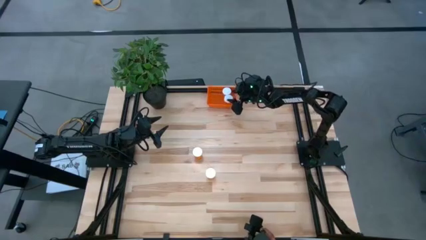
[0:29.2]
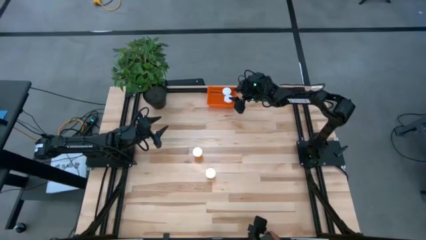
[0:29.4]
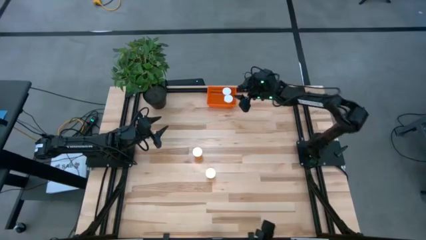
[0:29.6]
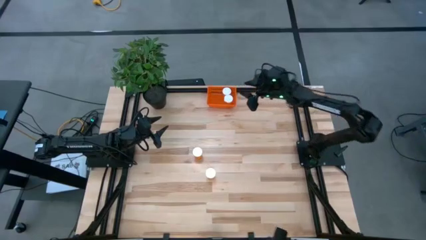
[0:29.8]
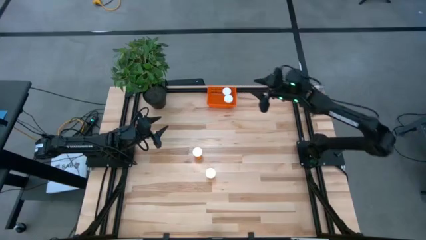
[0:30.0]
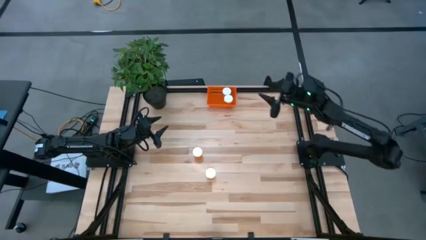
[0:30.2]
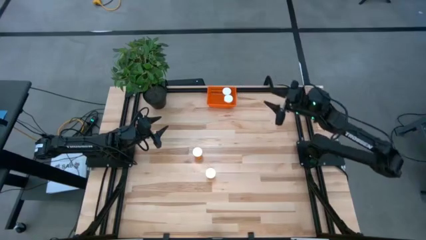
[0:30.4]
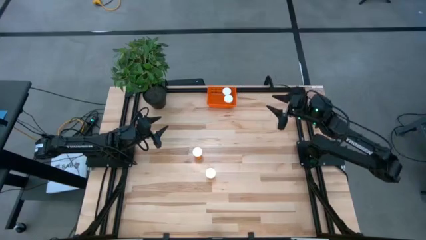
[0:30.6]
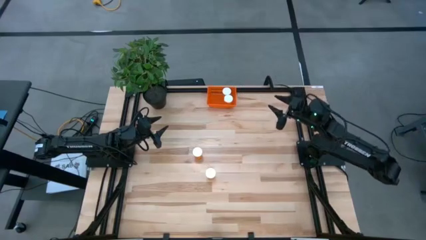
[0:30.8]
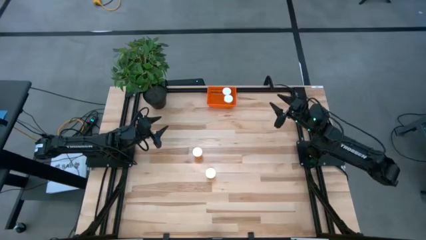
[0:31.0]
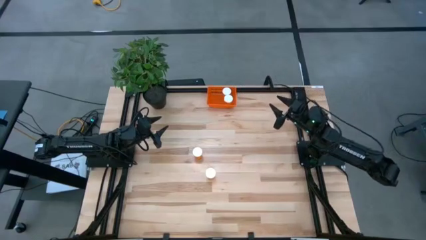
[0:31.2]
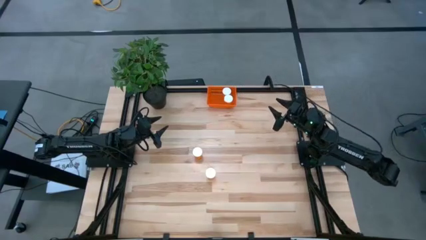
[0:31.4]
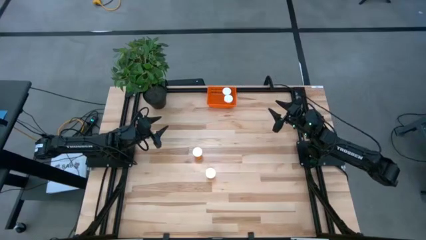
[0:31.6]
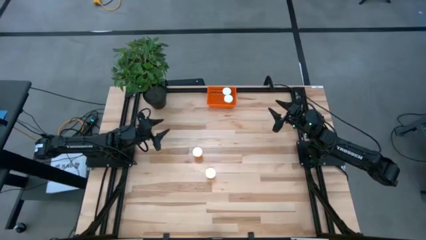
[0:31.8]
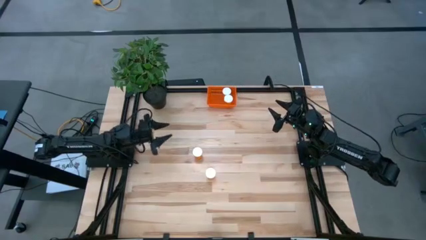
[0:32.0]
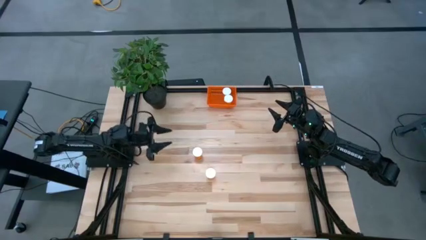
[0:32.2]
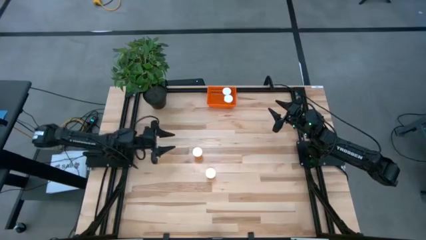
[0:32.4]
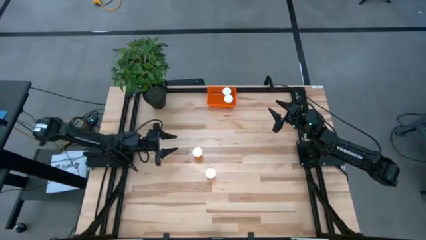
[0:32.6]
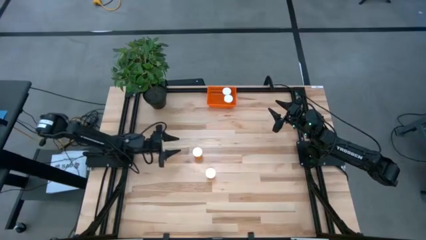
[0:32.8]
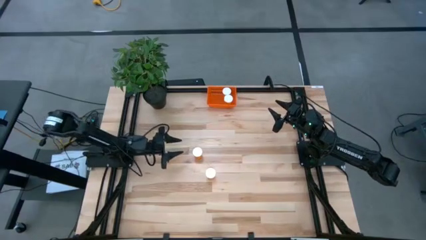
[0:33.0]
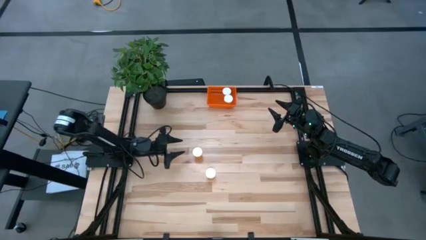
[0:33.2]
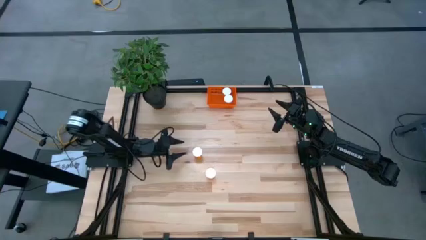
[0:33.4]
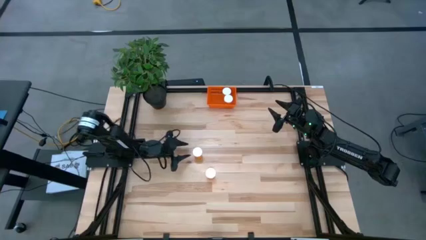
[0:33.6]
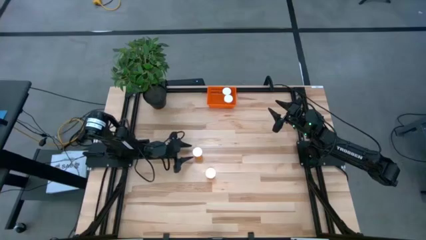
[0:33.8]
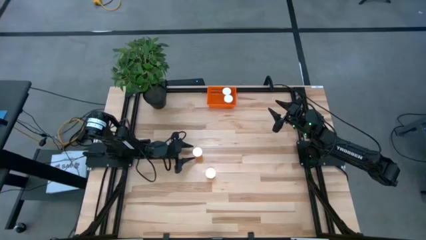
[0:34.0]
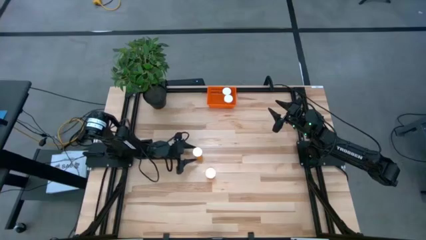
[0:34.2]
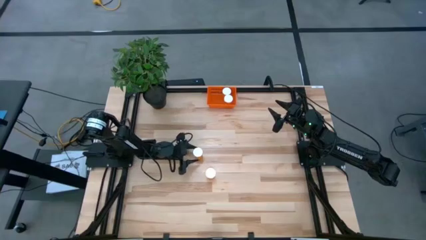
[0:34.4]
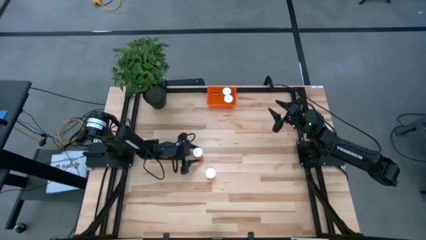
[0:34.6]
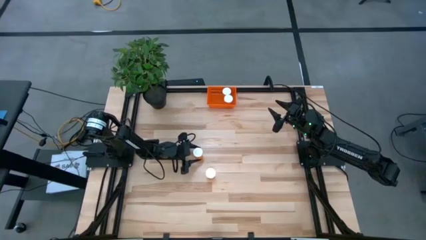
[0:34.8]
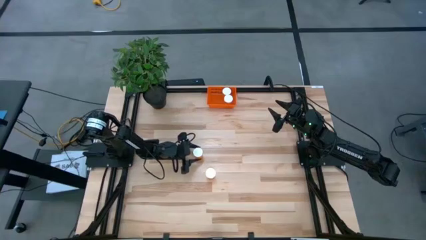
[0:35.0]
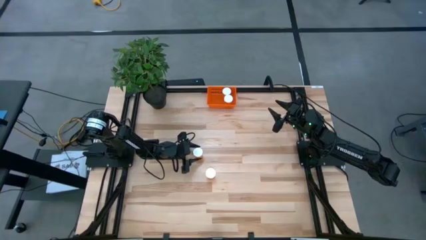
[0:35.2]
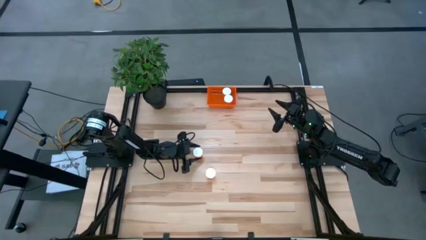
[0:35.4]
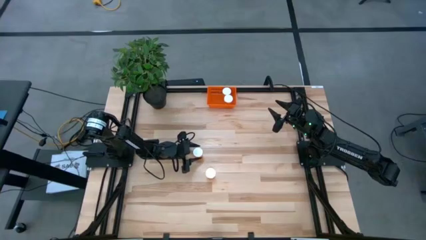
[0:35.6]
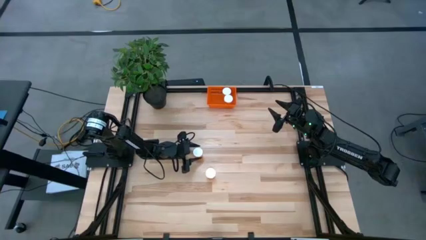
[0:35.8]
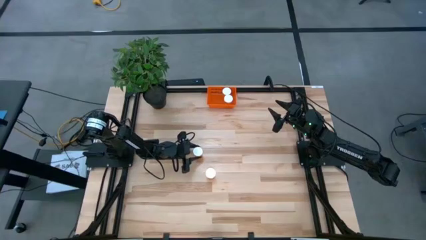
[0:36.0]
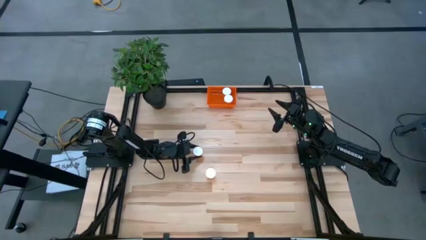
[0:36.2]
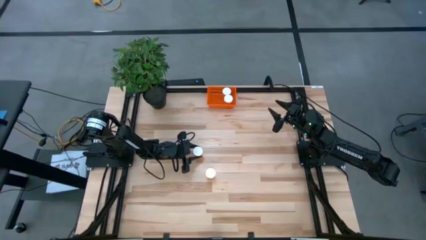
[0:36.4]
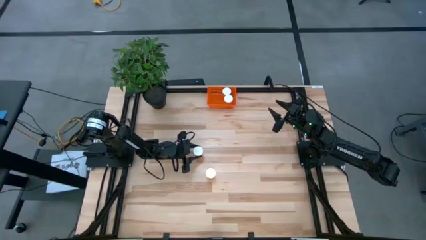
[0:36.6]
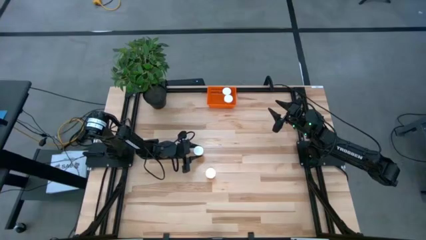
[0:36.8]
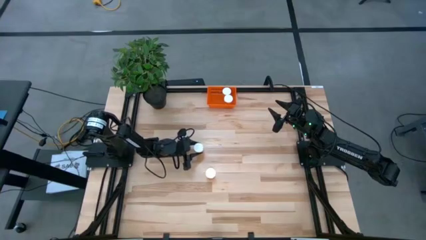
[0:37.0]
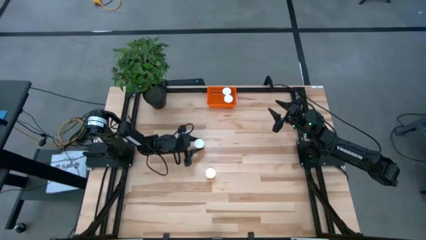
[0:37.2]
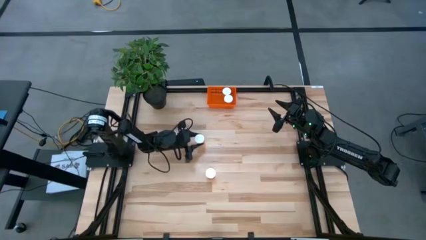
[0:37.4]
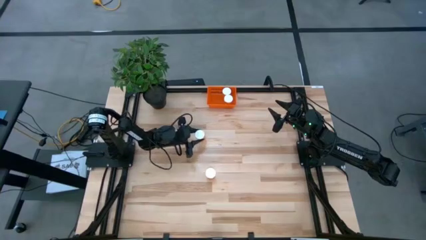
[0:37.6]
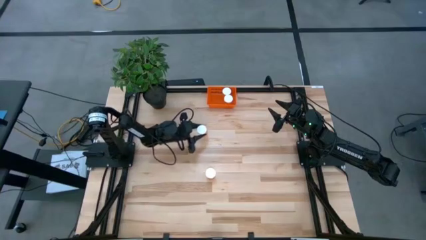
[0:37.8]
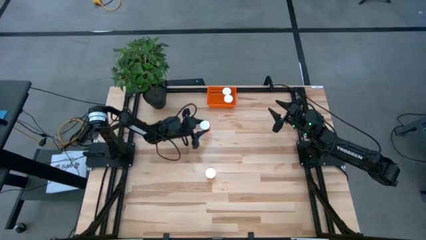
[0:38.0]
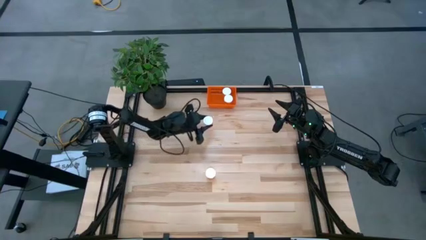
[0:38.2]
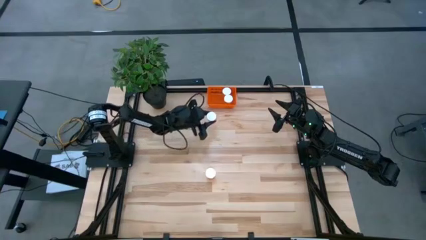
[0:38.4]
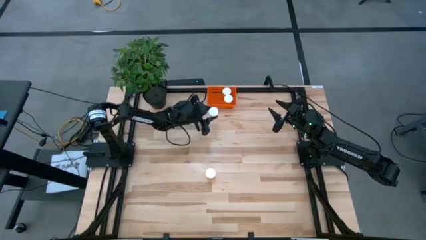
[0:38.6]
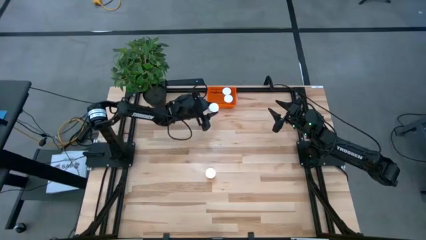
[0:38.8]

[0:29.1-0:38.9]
Task: Pick and place pill bottles into a basket
Put the top orange pill bottle into the orange bin

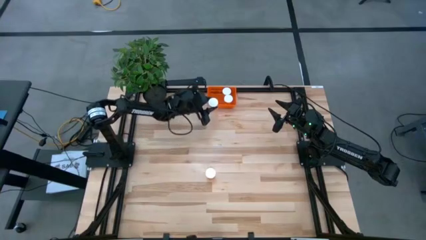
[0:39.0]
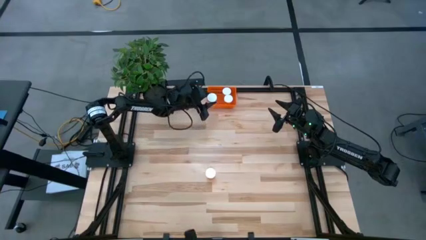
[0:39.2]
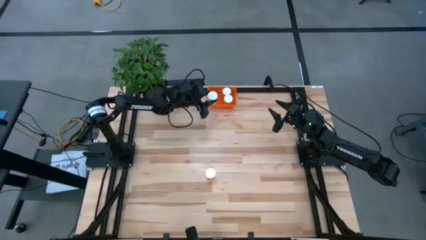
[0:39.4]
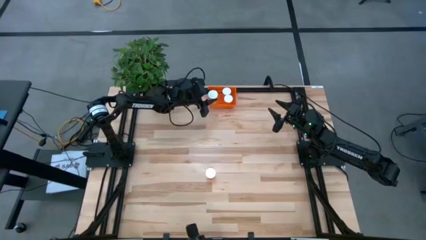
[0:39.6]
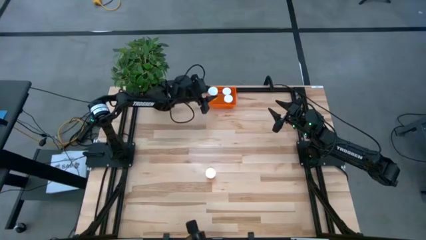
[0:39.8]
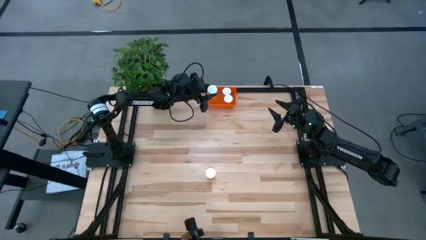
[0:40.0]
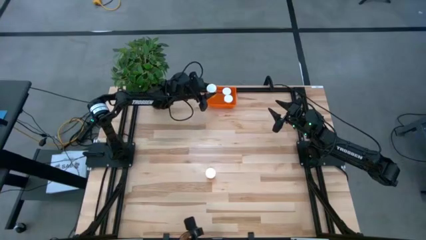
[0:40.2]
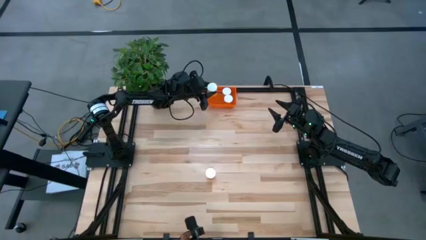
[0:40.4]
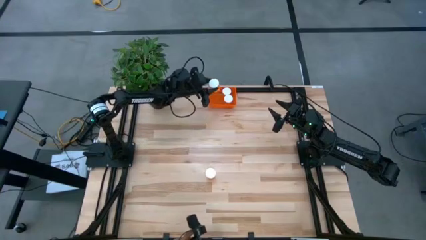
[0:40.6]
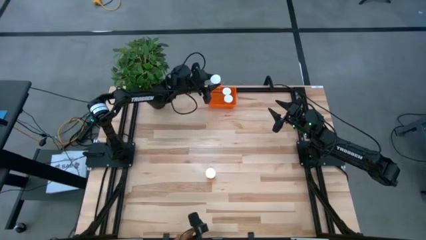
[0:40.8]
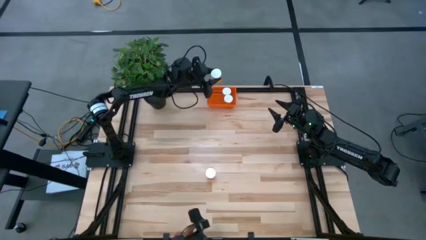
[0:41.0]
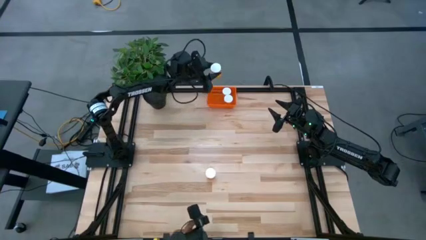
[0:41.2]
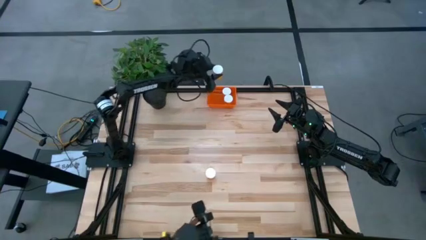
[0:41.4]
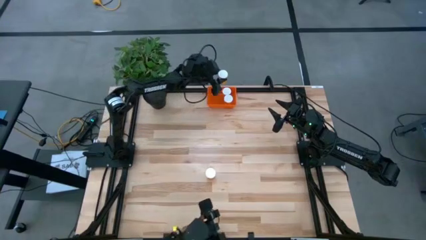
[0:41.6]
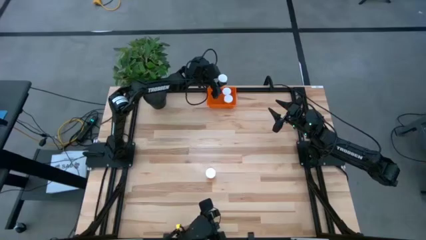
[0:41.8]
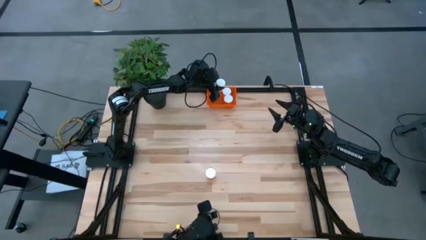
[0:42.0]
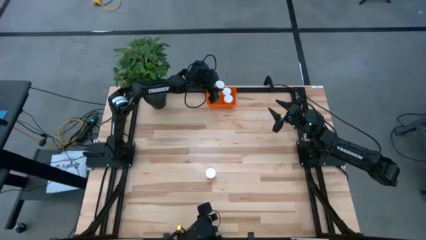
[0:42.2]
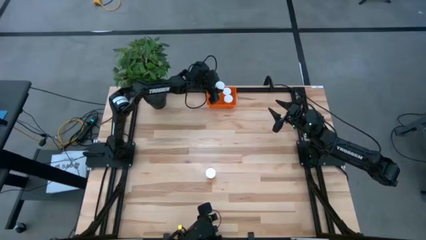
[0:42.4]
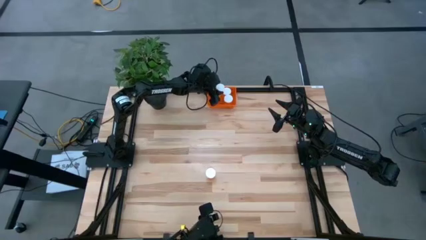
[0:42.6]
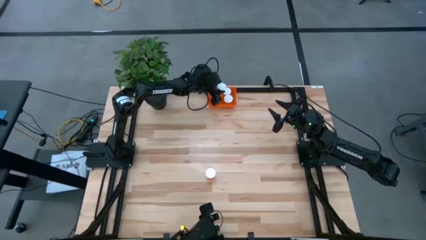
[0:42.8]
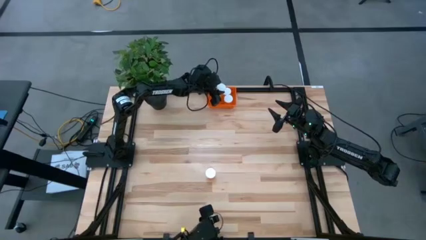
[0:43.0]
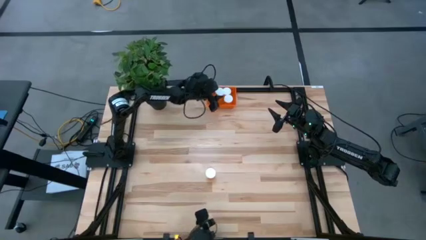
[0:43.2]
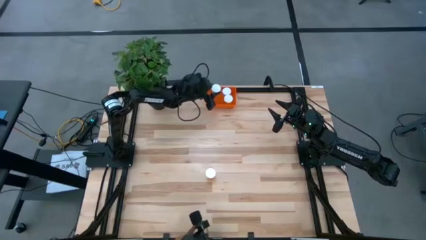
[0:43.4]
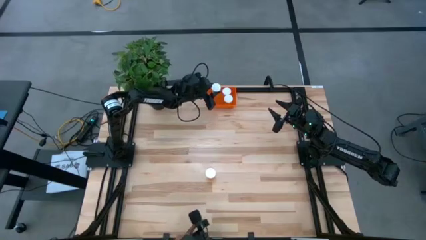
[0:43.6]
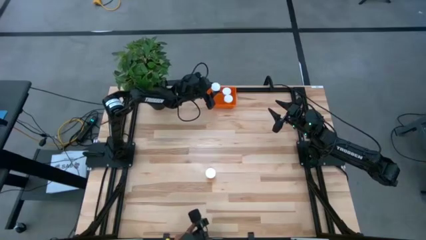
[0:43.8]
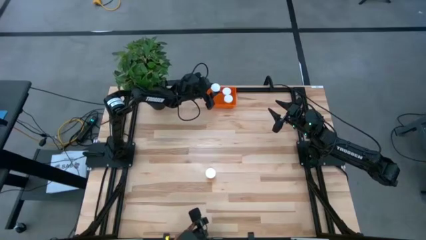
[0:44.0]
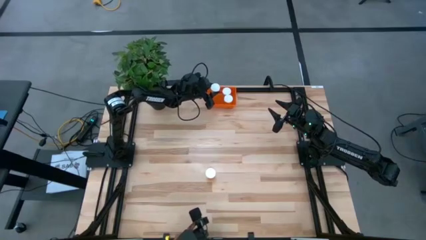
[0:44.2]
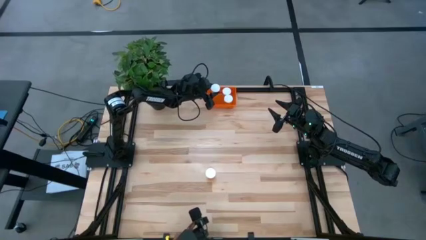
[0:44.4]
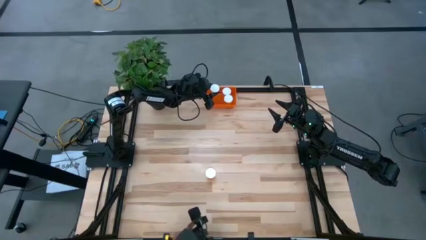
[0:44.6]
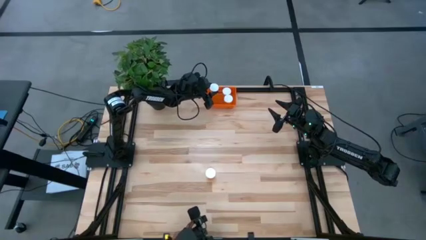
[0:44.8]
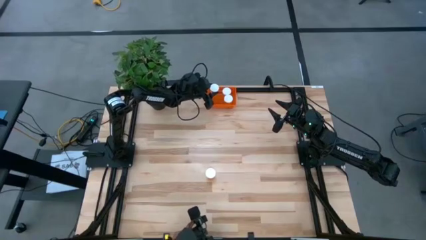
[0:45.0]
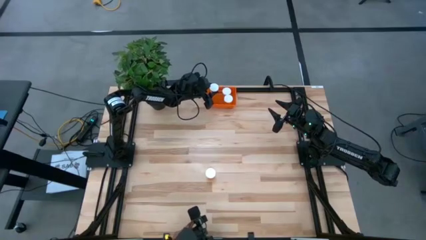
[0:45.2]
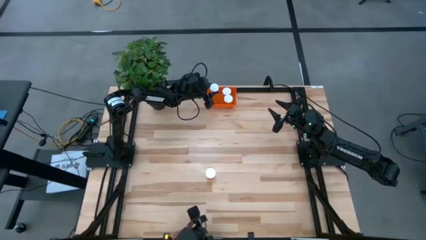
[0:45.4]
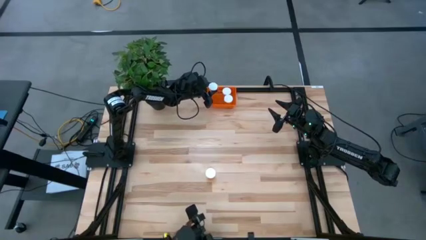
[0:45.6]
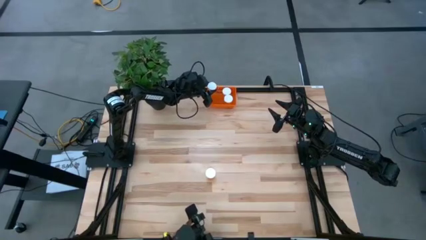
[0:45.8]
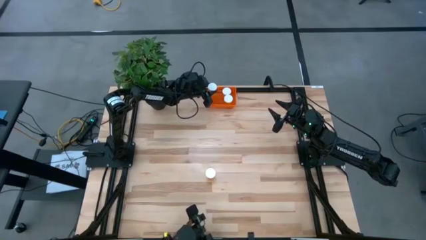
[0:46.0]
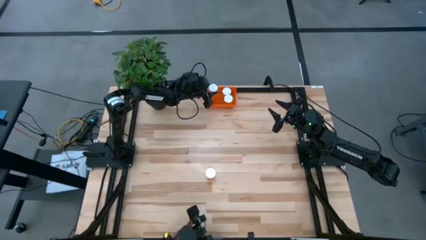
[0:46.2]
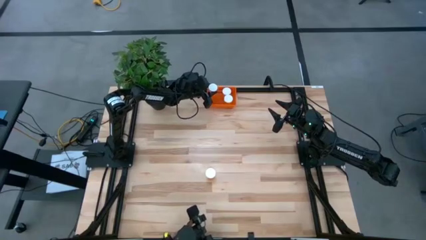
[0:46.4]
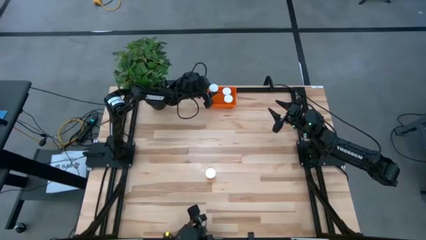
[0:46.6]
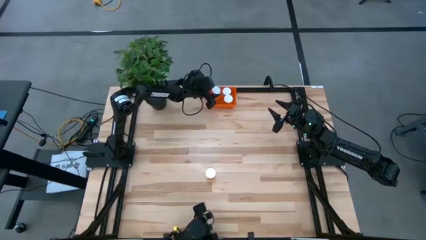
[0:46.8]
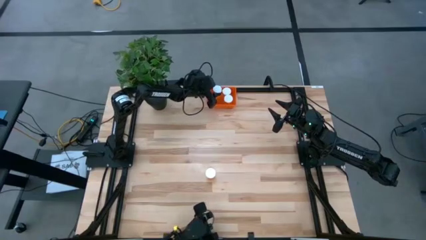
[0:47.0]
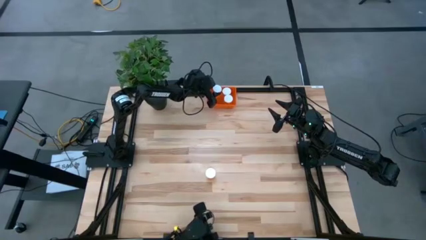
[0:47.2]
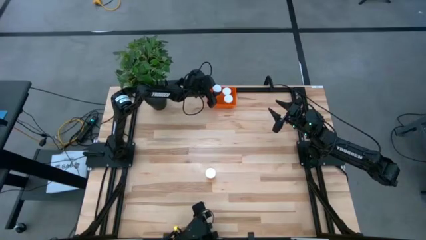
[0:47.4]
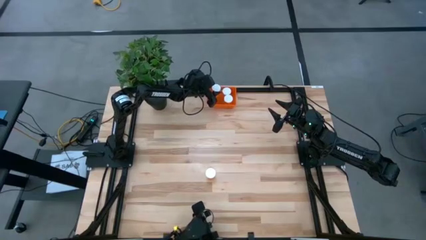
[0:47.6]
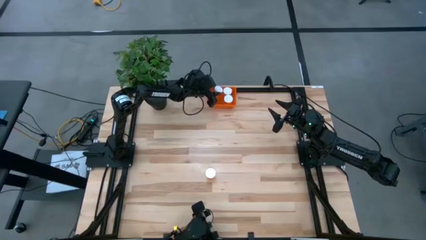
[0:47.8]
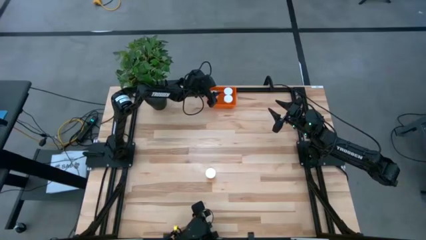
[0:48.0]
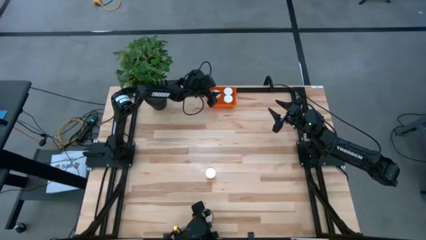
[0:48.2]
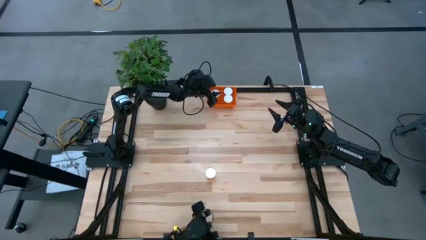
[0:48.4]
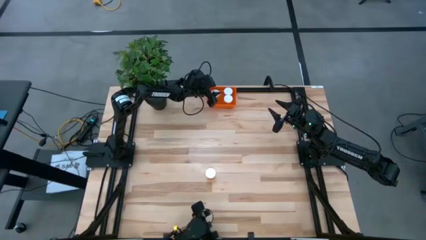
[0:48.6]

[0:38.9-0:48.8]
Put the top orange pill bottle into the orange bin
